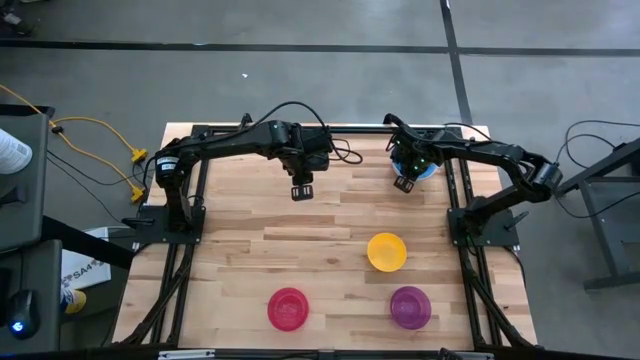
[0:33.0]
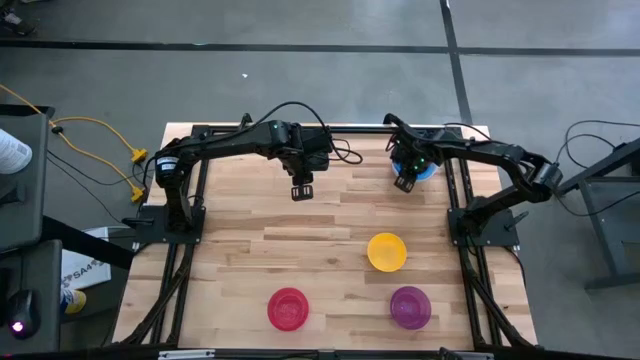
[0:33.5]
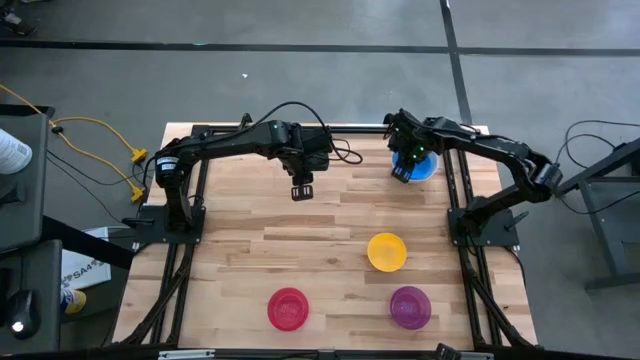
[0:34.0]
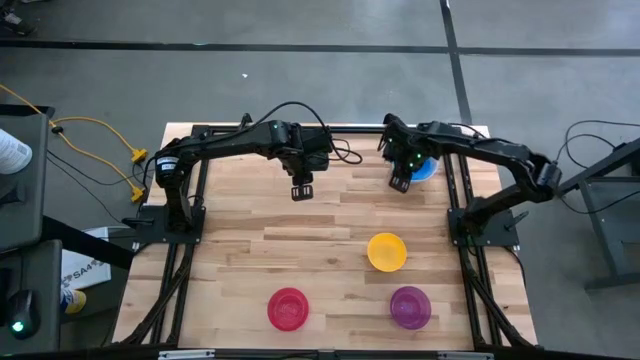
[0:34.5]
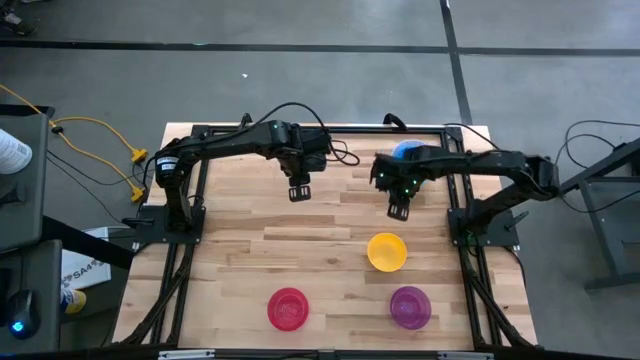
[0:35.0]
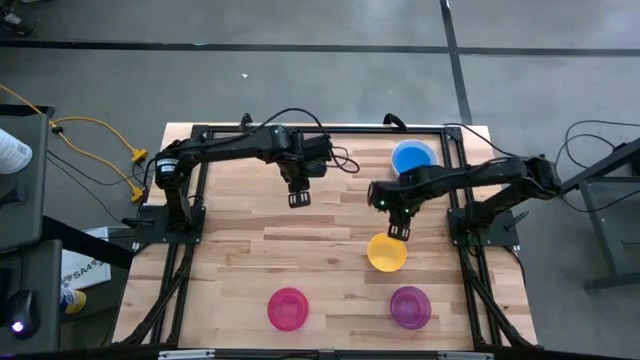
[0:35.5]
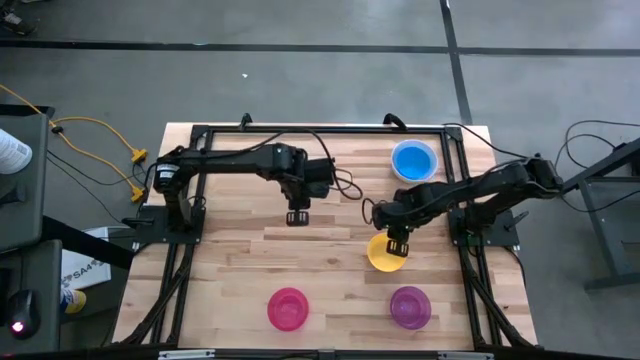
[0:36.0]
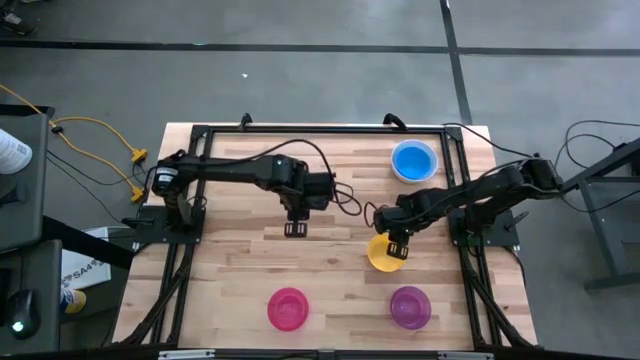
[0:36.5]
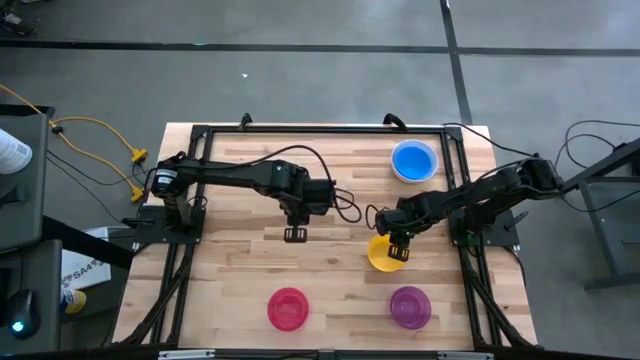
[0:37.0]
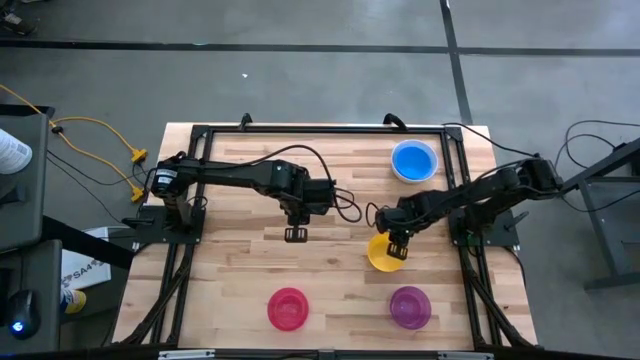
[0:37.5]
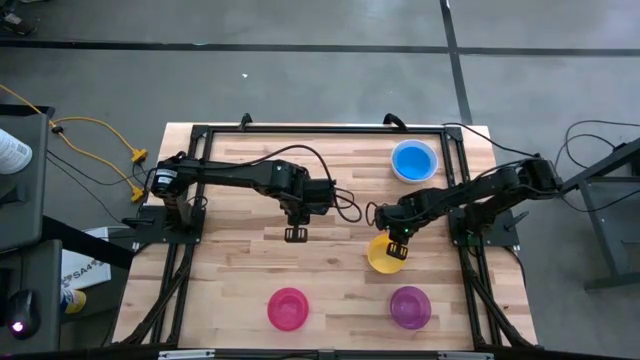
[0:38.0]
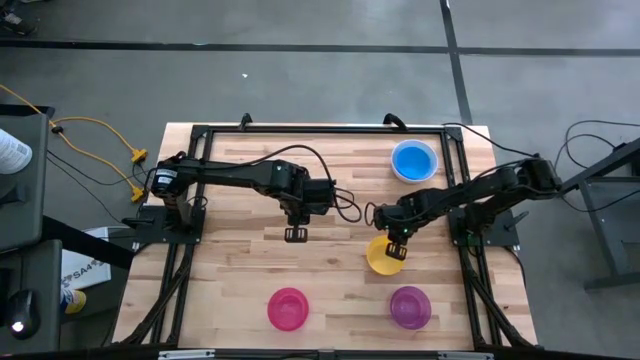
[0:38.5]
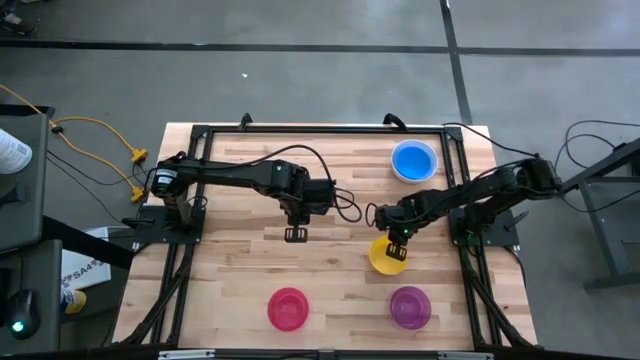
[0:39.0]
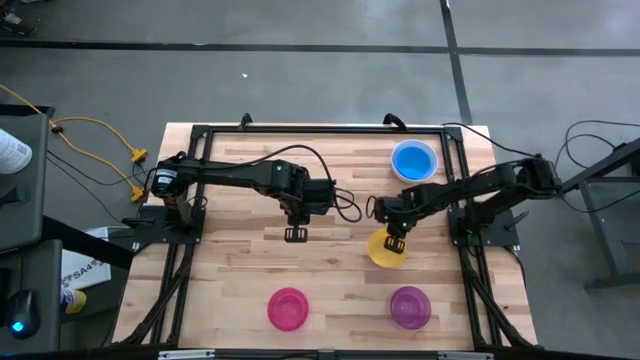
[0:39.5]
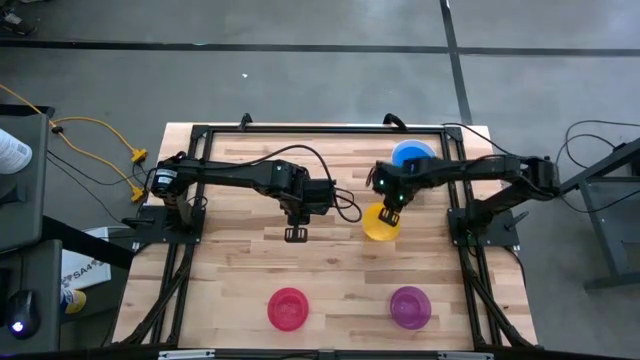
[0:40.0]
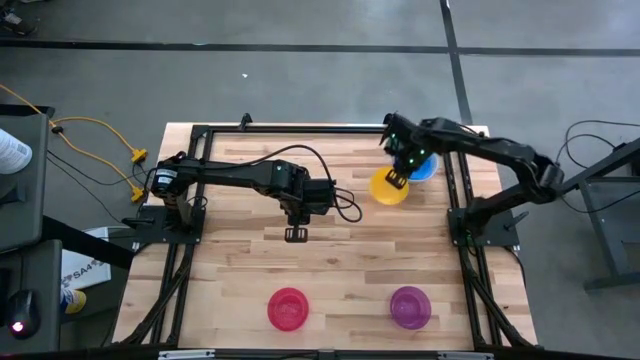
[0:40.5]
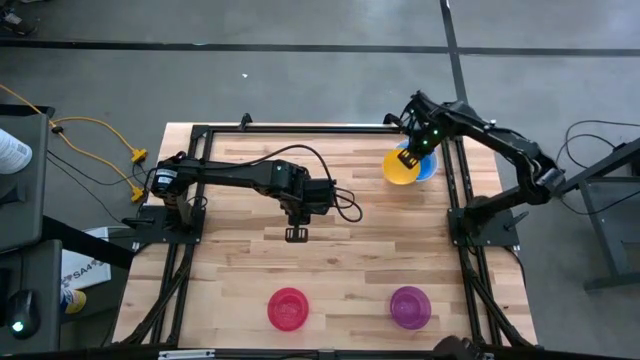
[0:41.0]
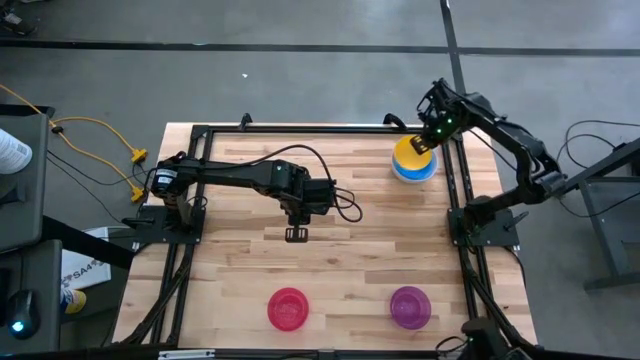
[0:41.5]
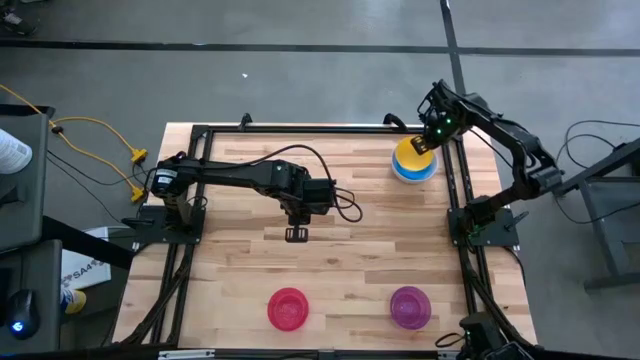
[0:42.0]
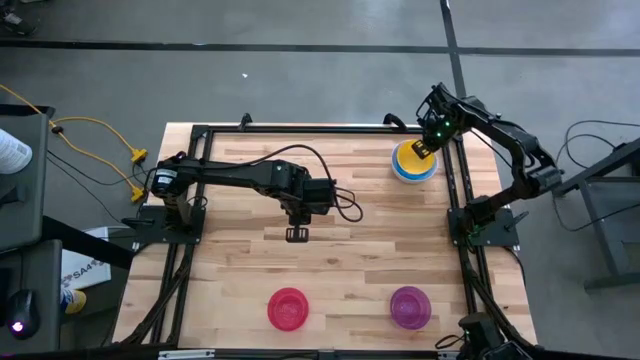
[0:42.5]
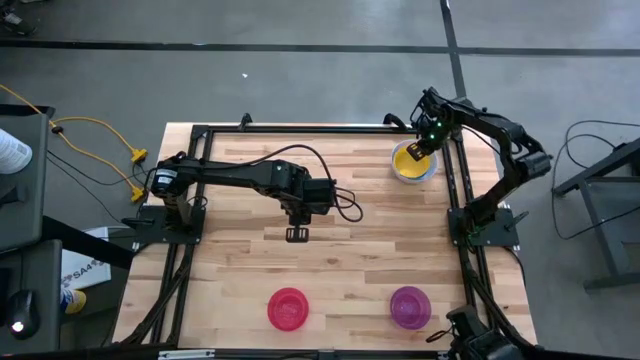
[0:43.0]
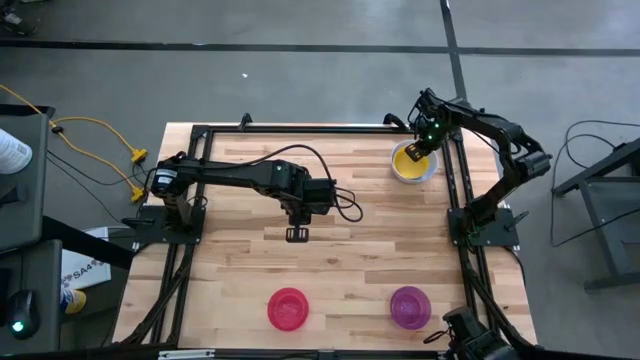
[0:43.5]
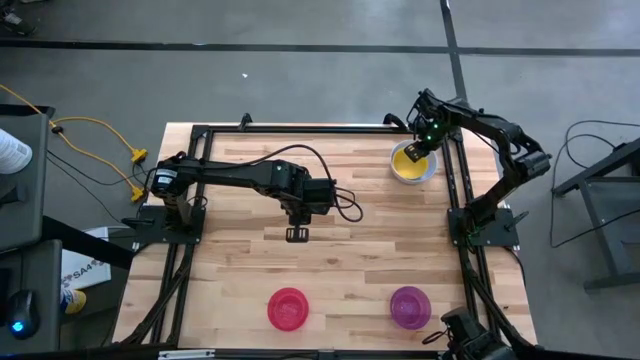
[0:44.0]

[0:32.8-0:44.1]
Stack the yellow bowl on top of the blue bowl

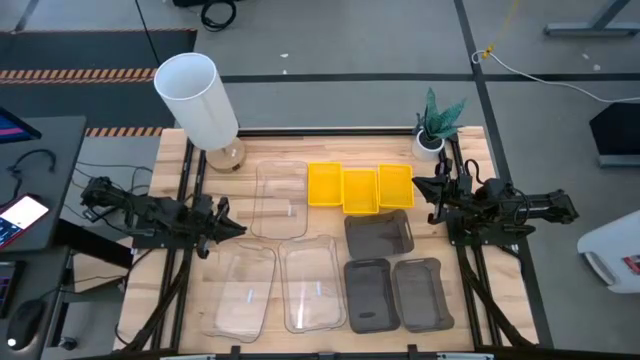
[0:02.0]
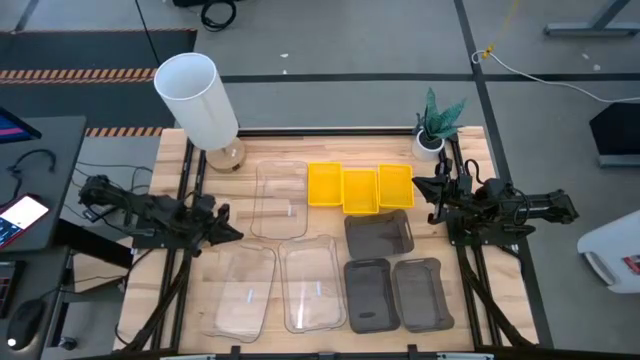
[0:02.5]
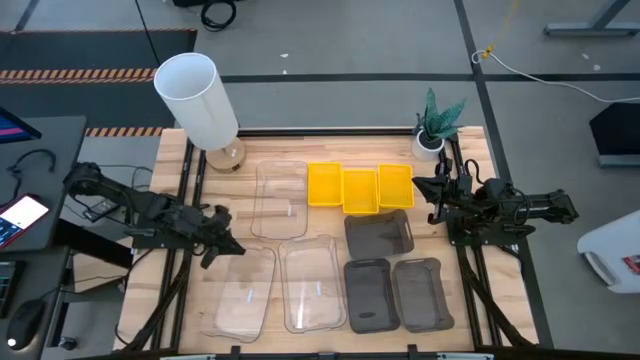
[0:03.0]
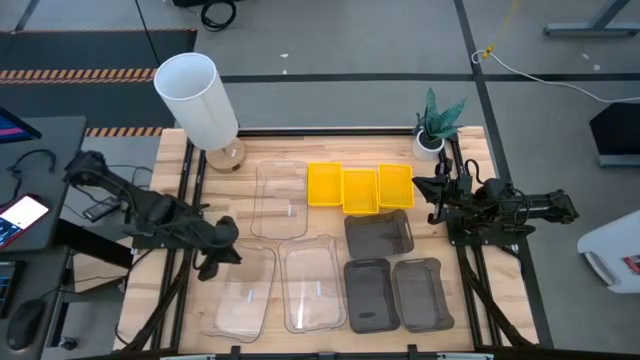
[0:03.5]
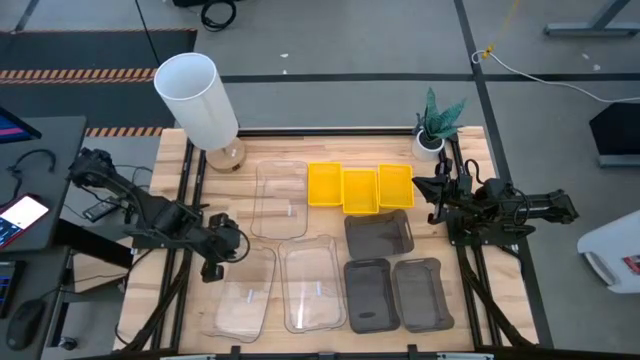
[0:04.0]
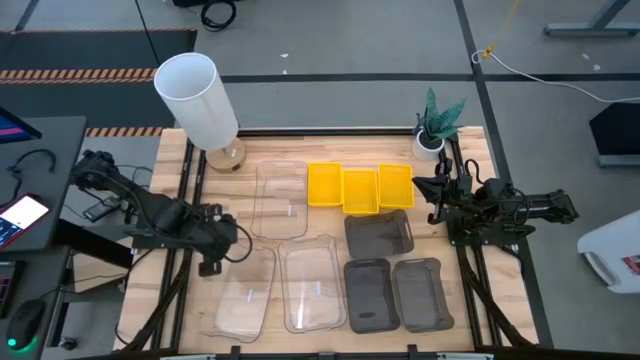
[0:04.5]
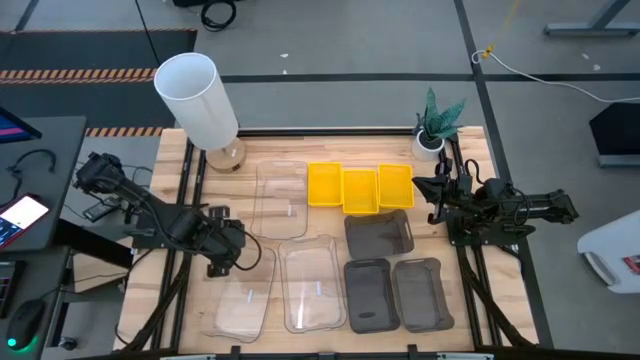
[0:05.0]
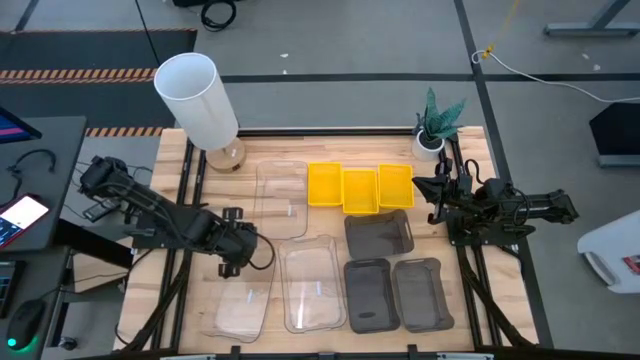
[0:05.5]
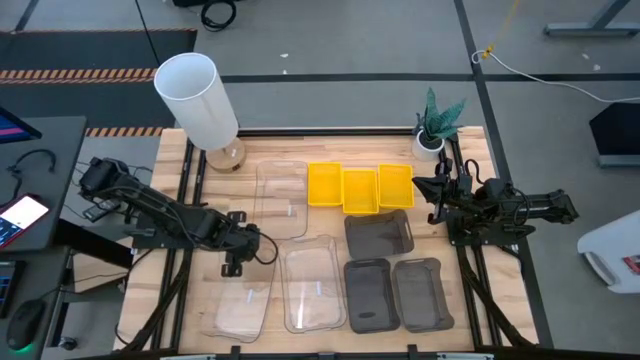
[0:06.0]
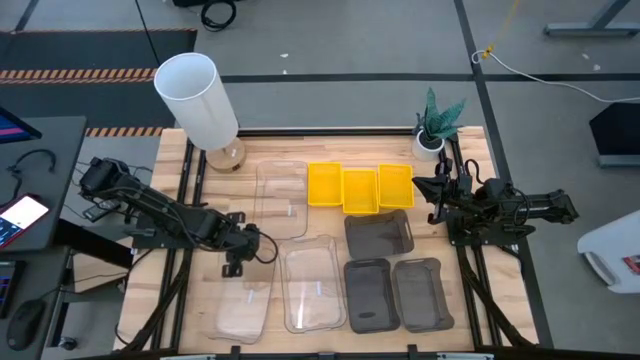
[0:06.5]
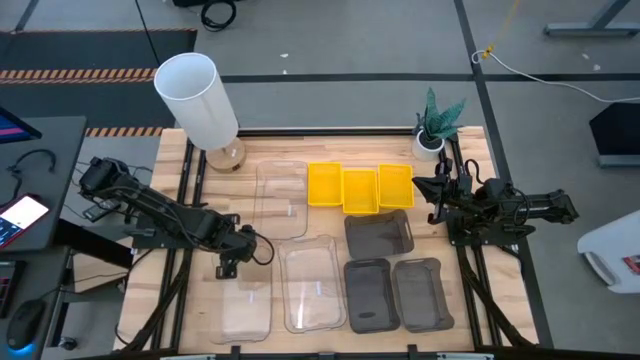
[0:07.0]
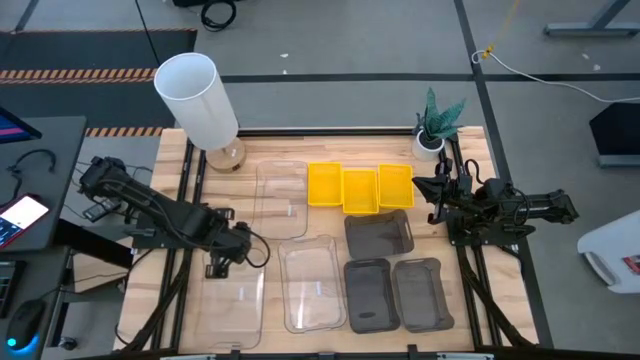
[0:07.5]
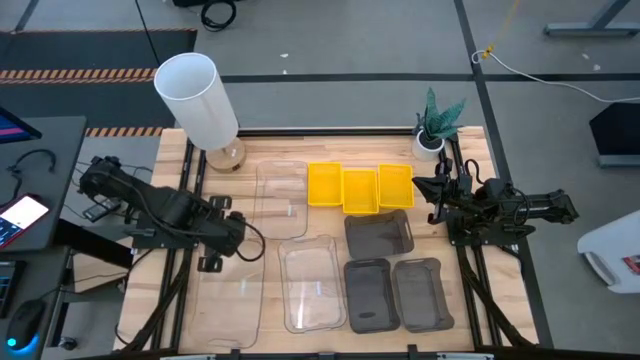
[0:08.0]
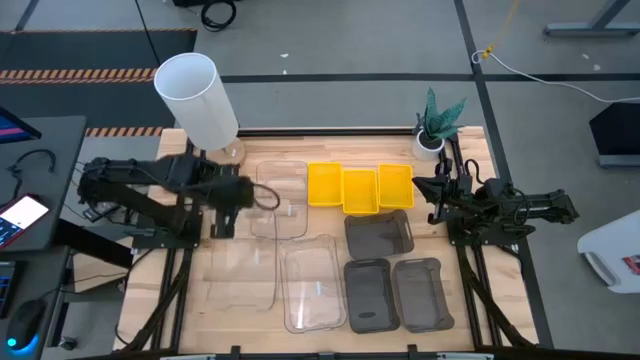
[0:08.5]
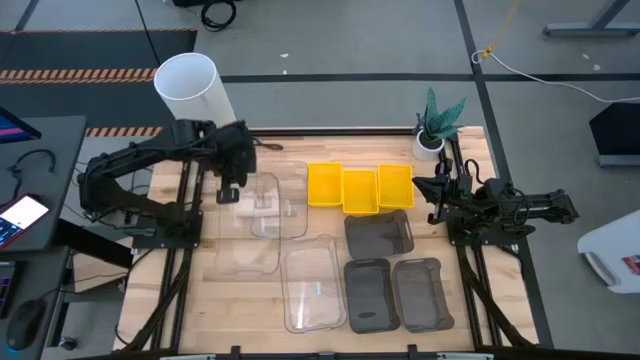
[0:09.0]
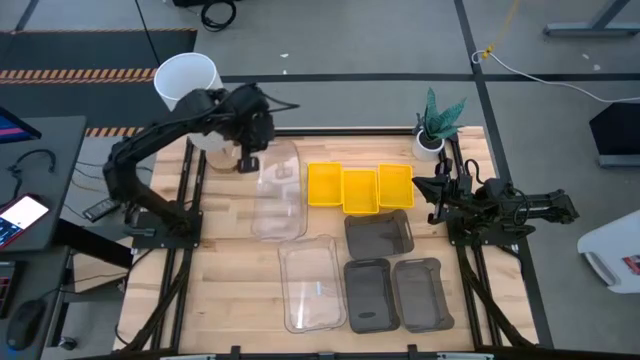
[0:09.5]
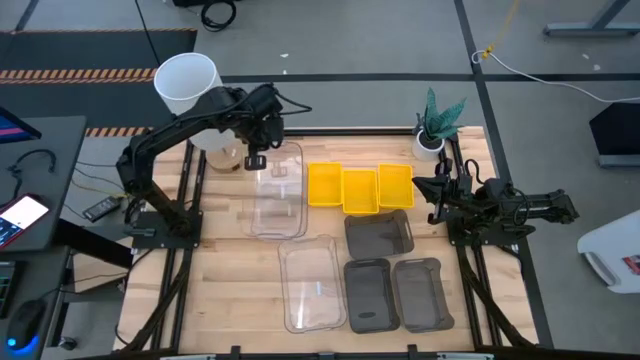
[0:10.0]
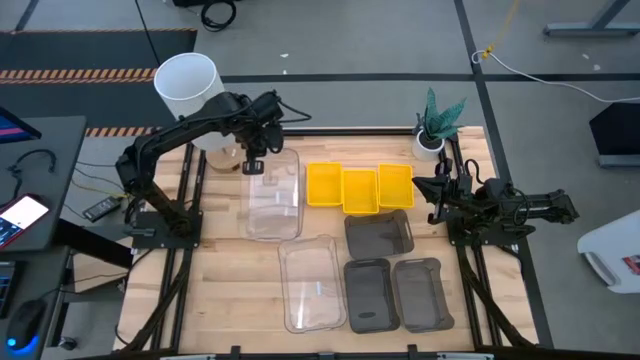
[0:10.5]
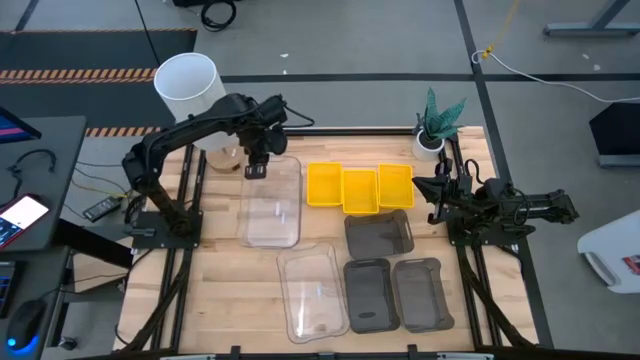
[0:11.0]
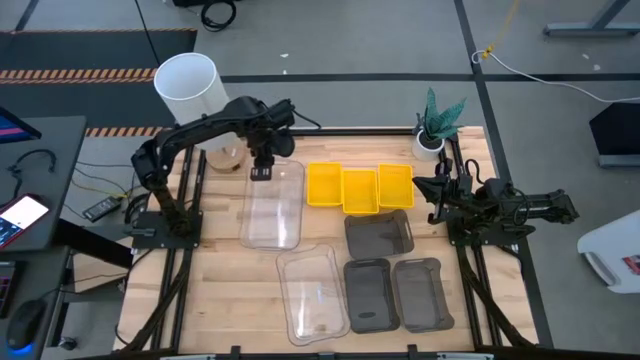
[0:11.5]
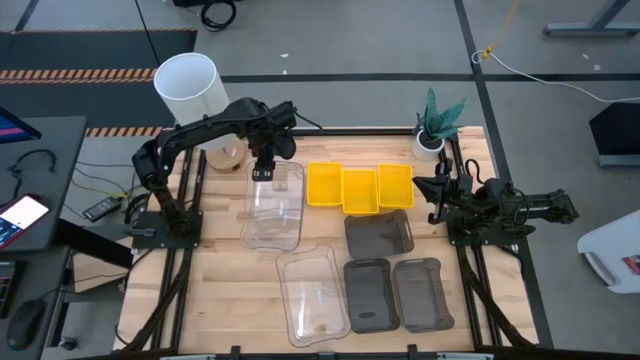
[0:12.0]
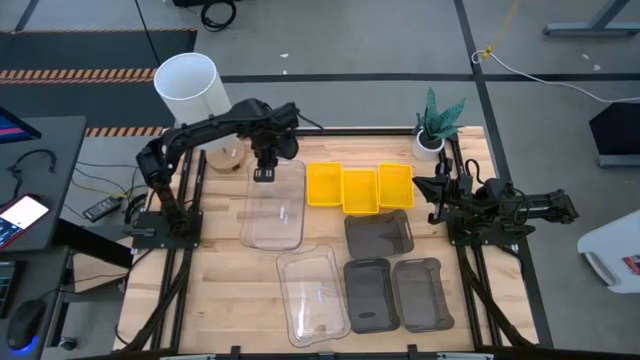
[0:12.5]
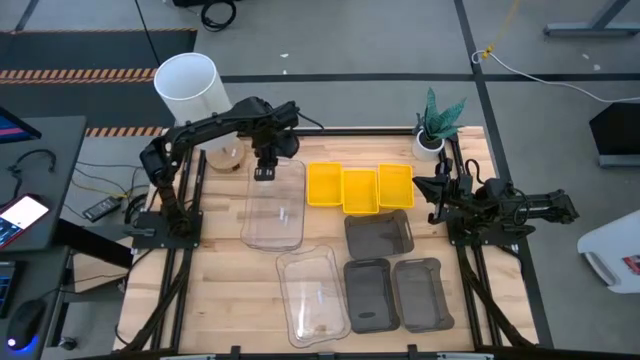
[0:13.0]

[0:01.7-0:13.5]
Stack the bottom left transparent bin on the top transparent bin
